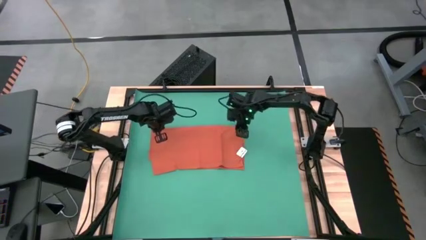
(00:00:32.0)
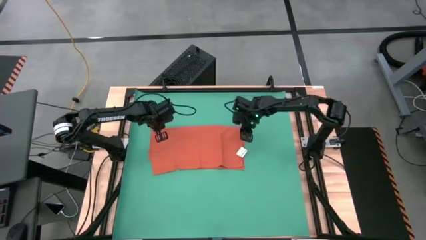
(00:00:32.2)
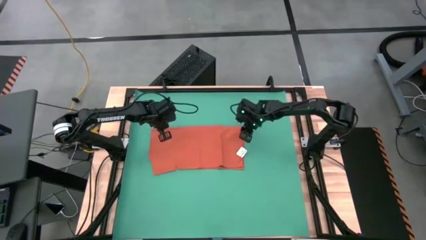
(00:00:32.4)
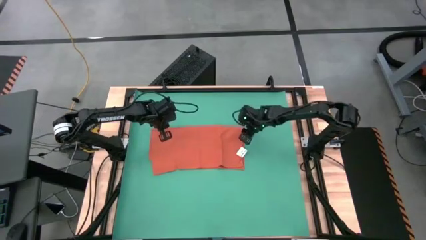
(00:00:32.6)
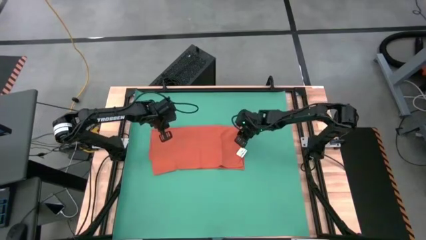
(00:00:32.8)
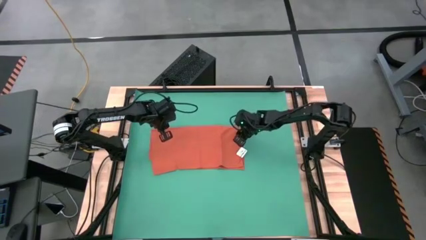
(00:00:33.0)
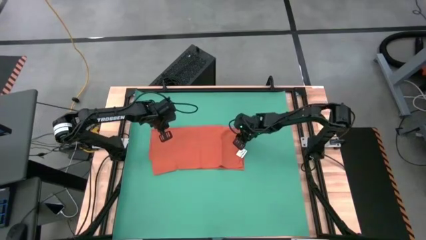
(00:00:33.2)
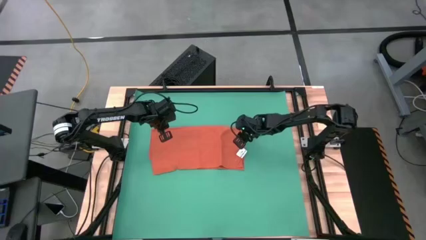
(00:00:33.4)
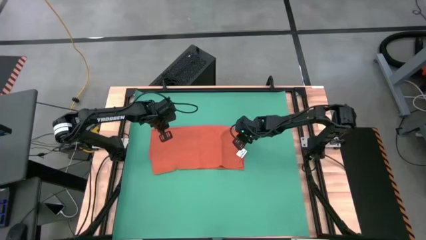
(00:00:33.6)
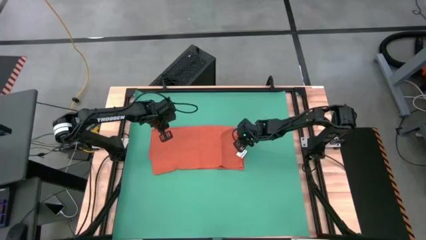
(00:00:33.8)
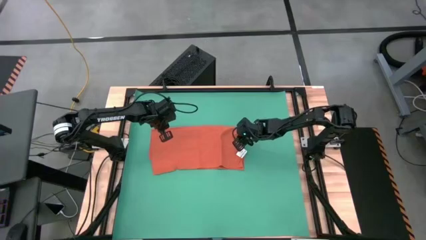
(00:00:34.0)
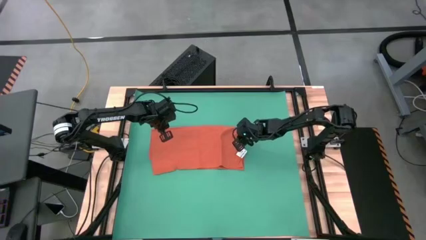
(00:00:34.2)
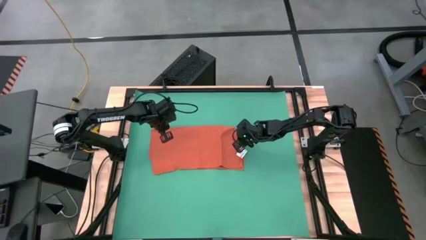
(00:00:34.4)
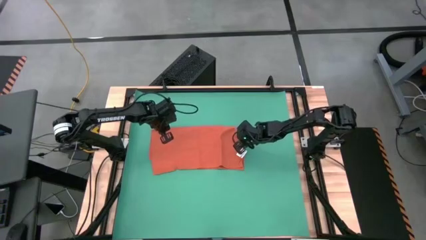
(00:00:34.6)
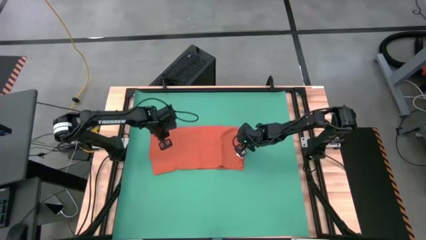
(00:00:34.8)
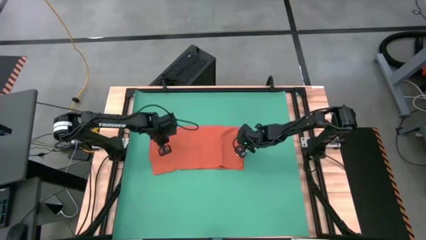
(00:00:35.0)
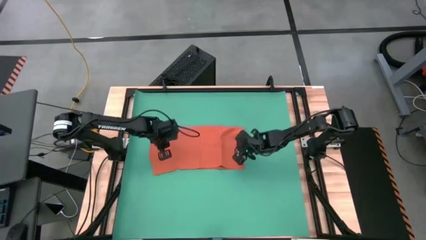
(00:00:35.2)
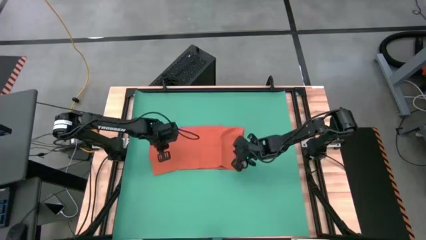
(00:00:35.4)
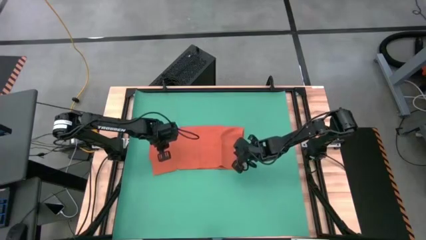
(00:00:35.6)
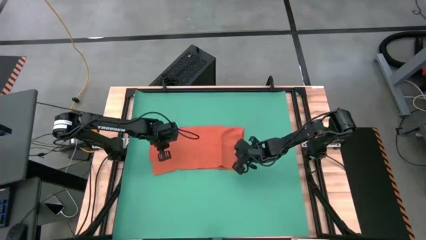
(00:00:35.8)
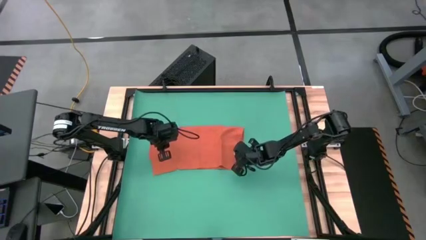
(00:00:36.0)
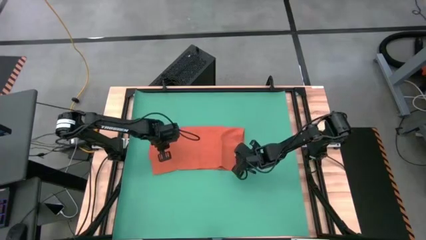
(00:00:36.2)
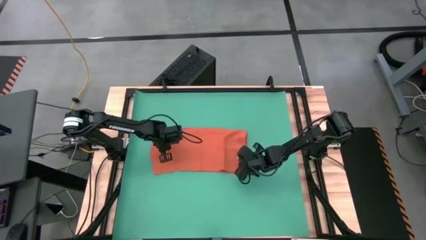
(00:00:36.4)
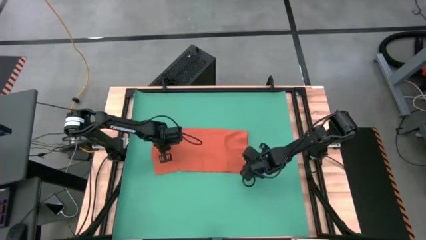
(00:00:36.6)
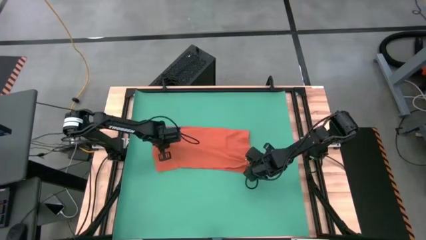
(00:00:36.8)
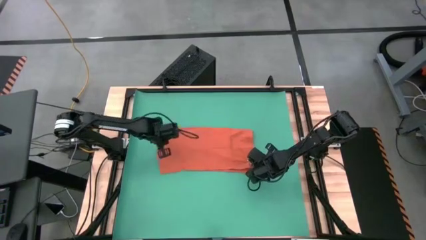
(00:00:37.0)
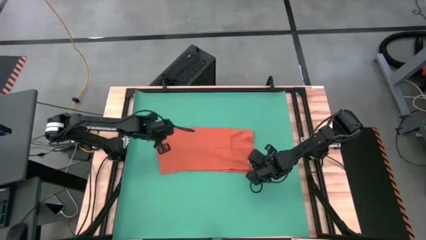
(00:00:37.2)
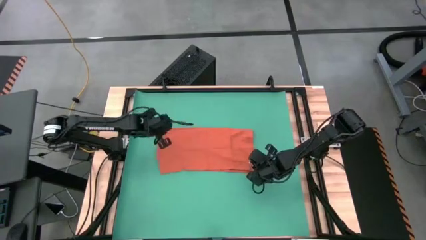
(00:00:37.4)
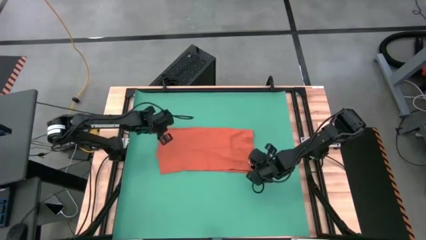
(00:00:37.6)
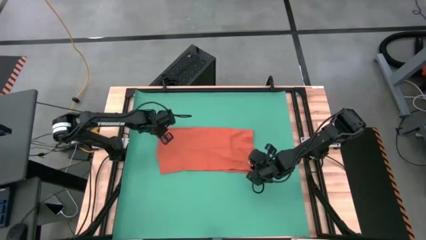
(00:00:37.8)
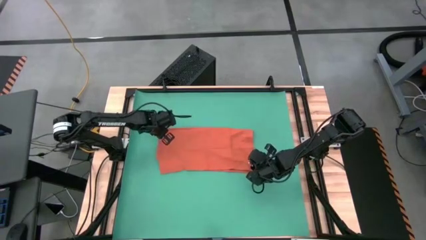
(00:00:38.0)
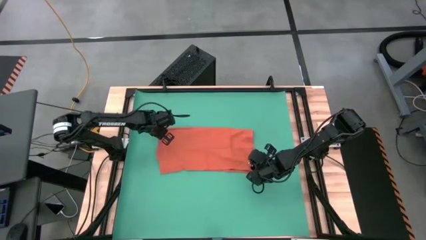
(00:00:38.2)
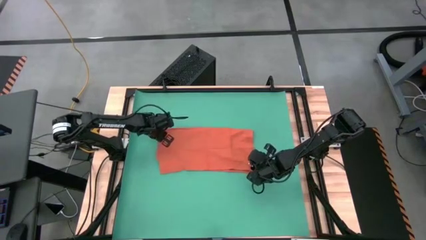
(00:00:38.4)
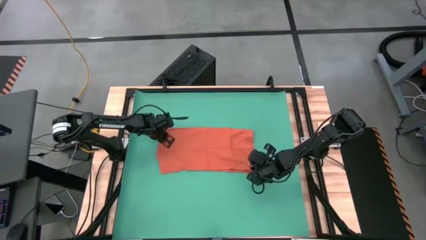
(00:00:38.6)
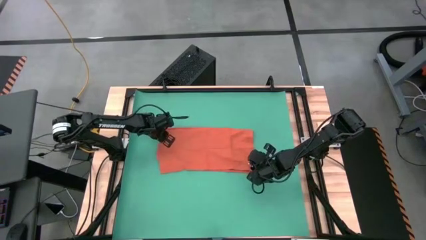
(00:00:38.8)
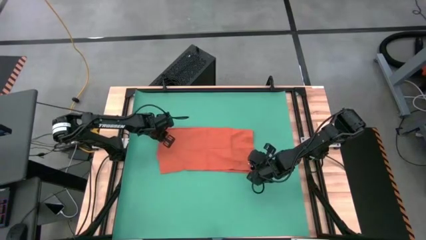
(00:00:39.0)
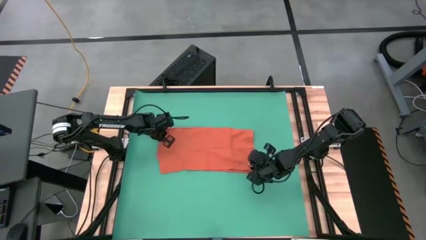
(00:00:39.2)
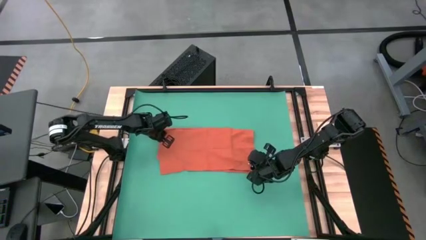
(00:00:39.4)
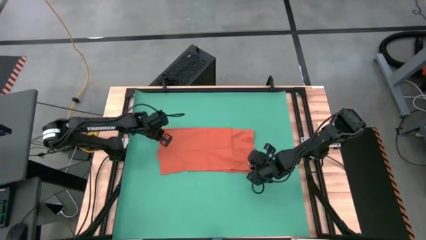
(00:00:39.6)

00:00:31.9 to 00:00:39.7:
Task: Roll towel
Roll the towel
